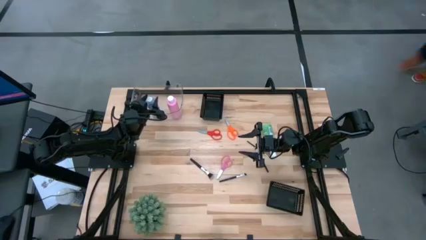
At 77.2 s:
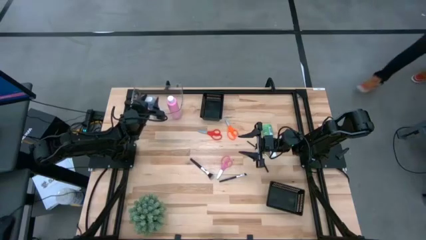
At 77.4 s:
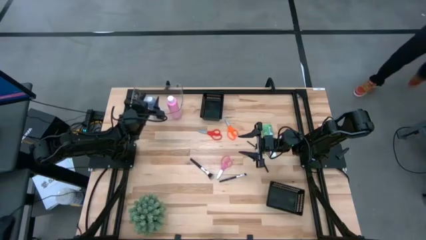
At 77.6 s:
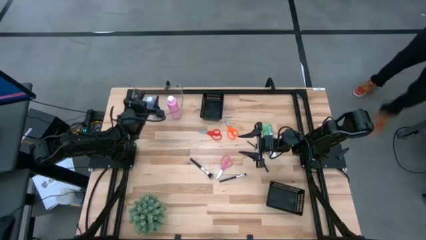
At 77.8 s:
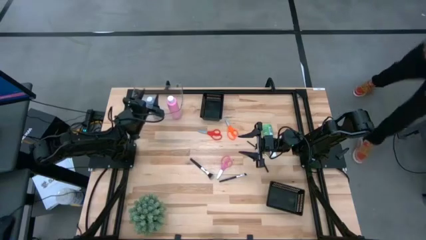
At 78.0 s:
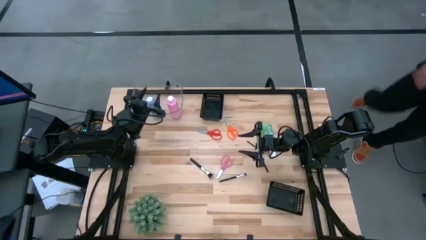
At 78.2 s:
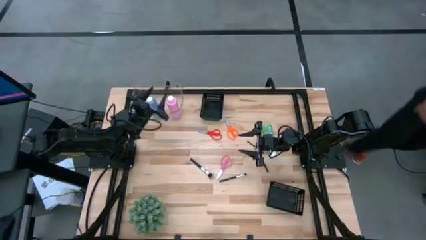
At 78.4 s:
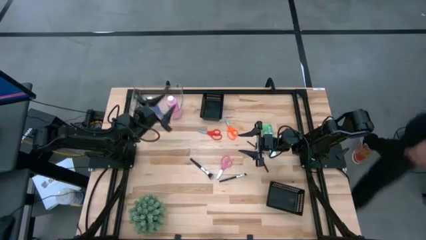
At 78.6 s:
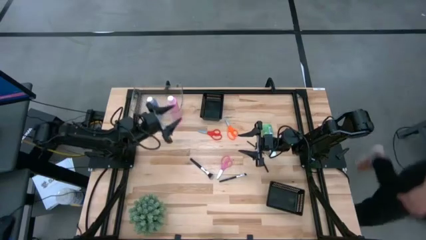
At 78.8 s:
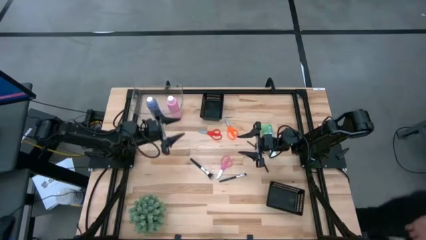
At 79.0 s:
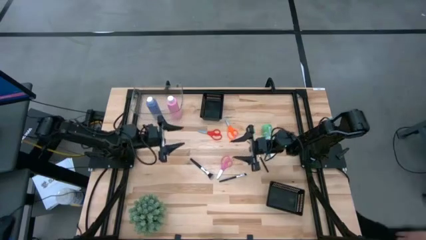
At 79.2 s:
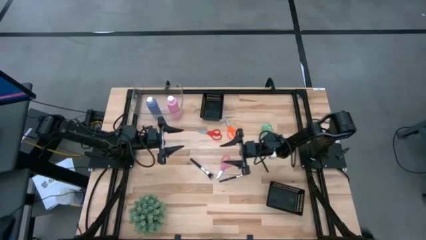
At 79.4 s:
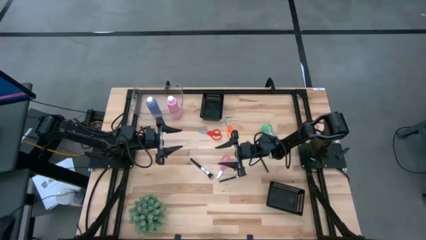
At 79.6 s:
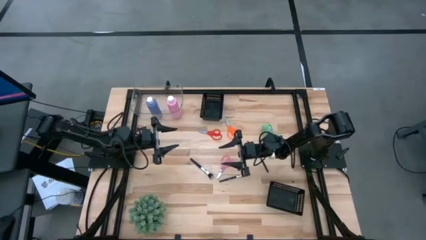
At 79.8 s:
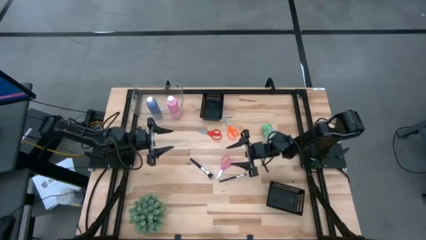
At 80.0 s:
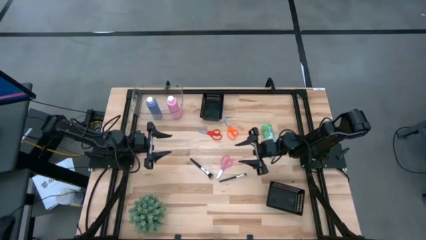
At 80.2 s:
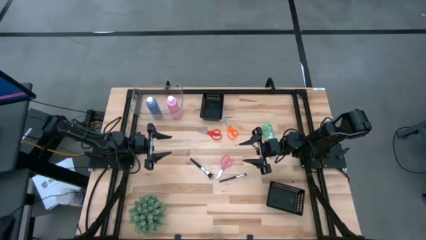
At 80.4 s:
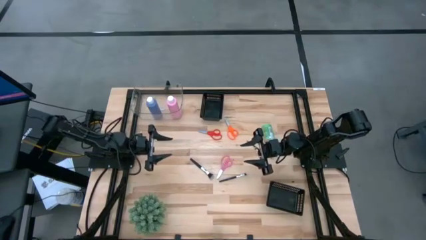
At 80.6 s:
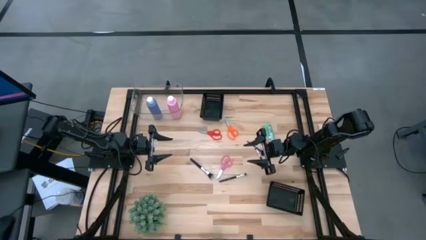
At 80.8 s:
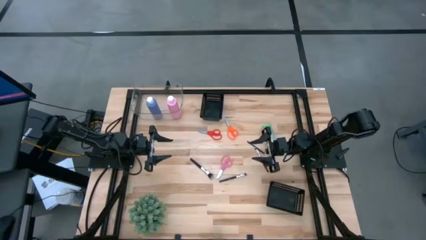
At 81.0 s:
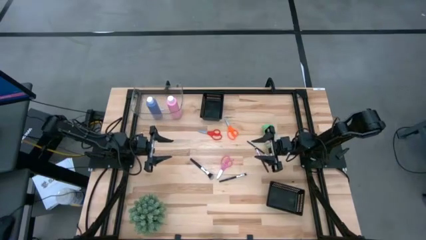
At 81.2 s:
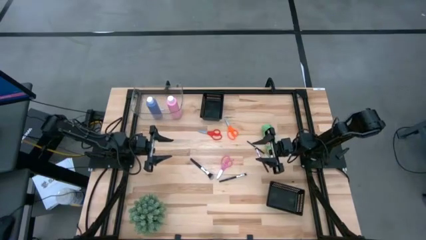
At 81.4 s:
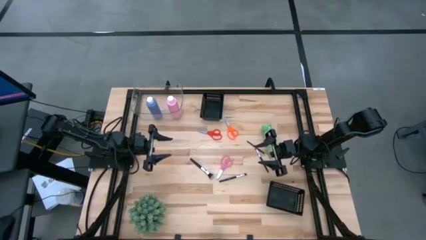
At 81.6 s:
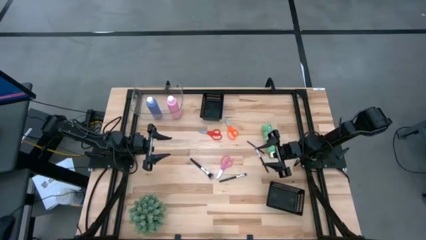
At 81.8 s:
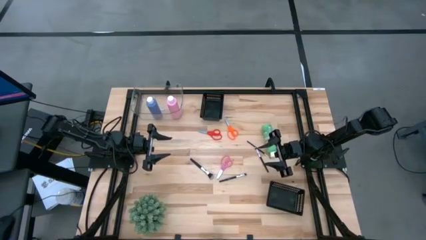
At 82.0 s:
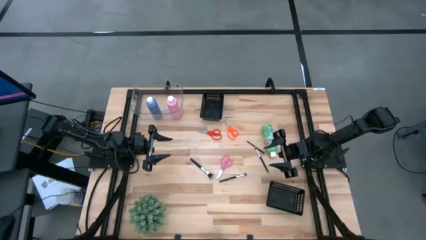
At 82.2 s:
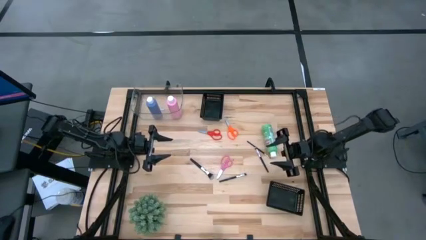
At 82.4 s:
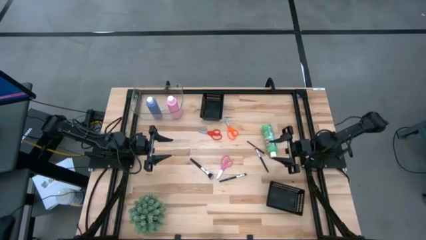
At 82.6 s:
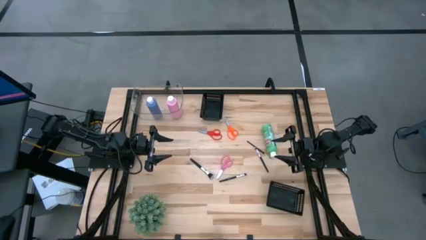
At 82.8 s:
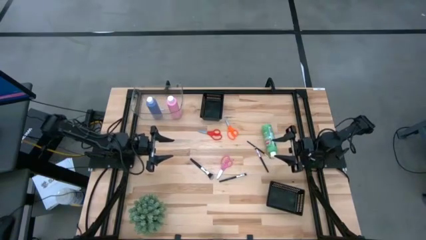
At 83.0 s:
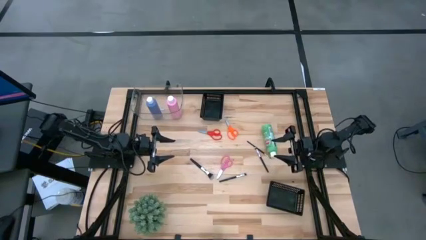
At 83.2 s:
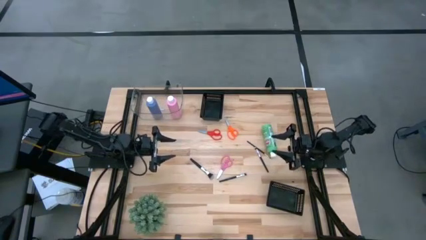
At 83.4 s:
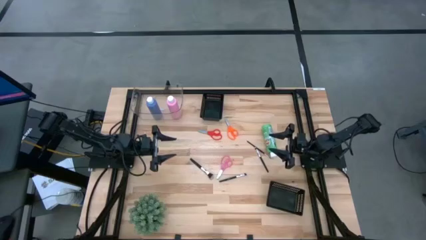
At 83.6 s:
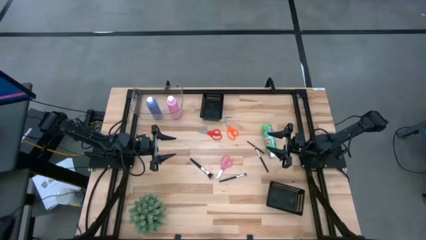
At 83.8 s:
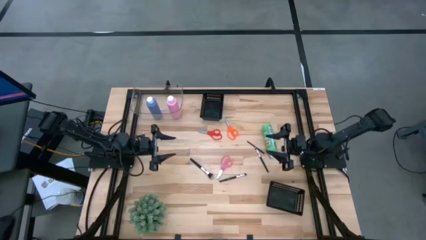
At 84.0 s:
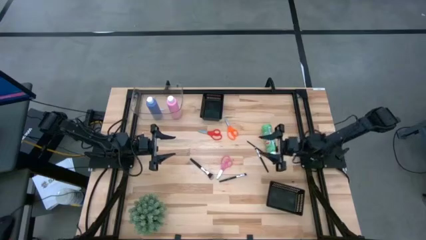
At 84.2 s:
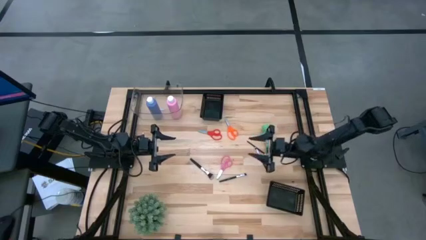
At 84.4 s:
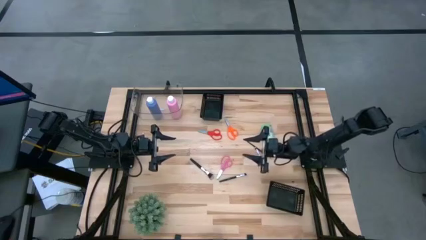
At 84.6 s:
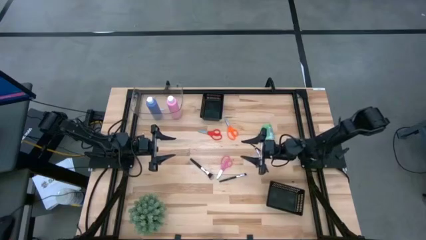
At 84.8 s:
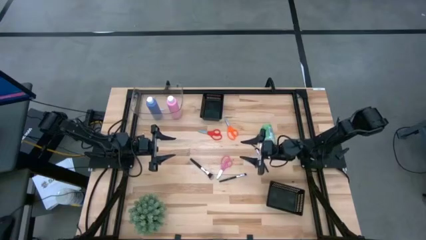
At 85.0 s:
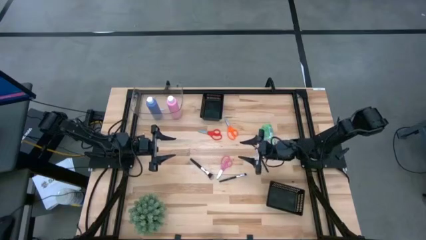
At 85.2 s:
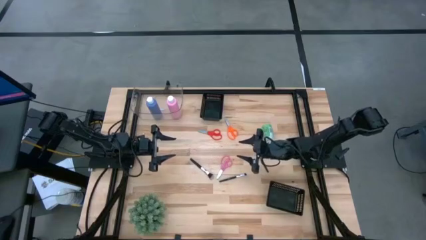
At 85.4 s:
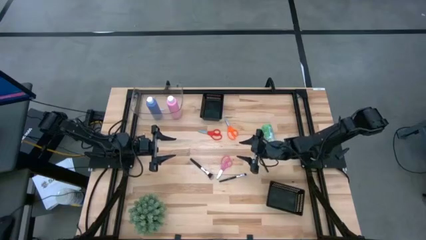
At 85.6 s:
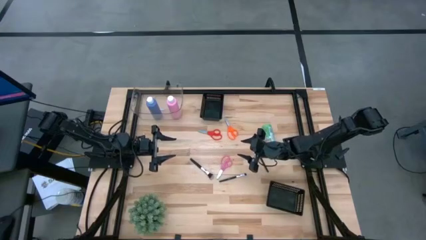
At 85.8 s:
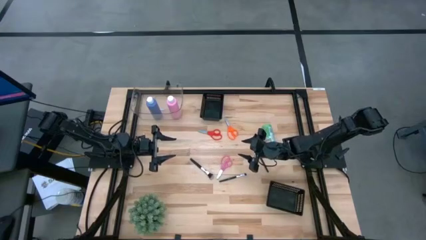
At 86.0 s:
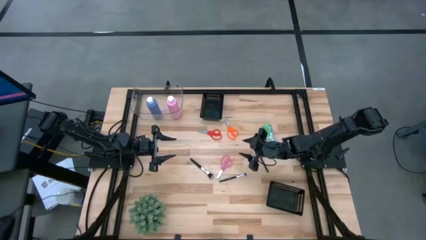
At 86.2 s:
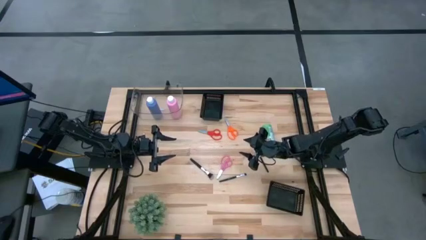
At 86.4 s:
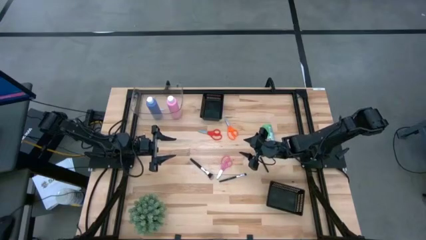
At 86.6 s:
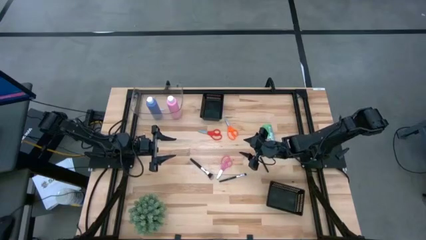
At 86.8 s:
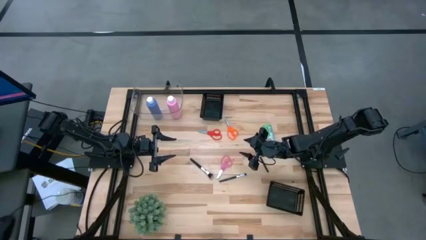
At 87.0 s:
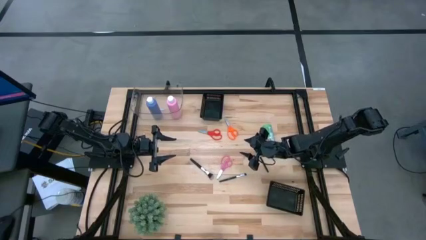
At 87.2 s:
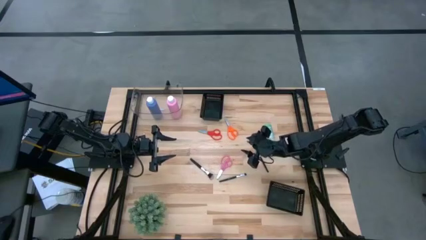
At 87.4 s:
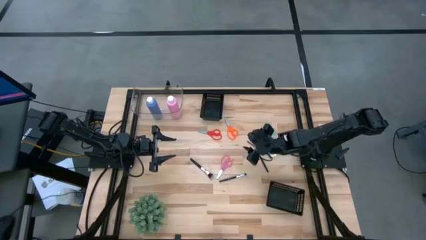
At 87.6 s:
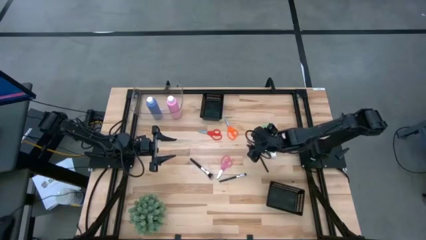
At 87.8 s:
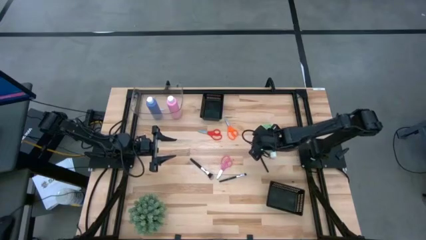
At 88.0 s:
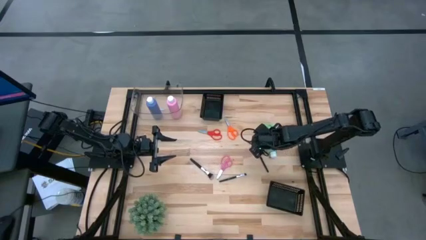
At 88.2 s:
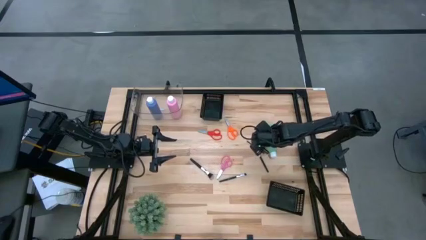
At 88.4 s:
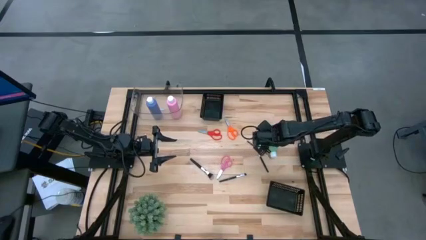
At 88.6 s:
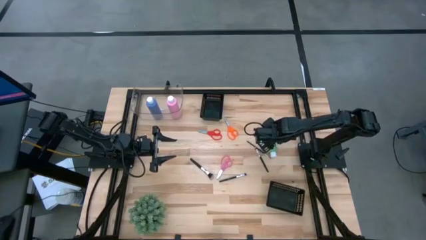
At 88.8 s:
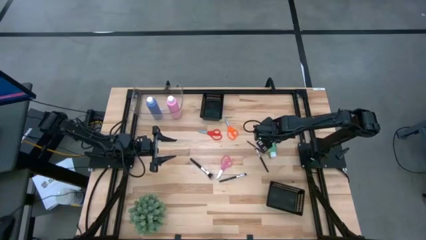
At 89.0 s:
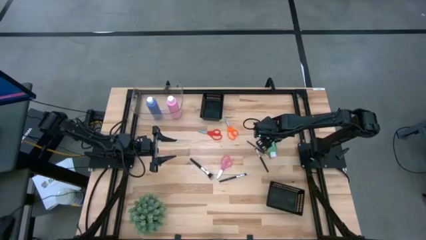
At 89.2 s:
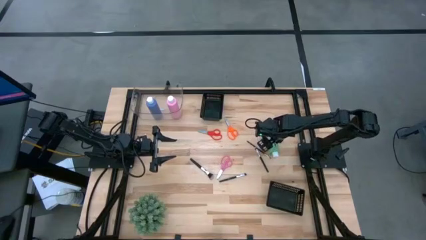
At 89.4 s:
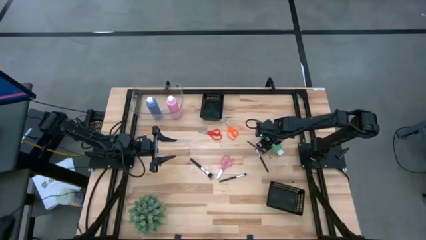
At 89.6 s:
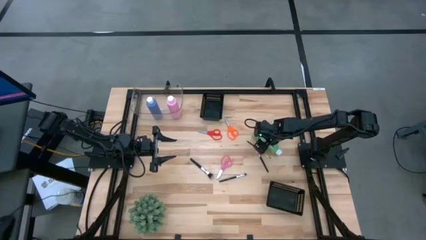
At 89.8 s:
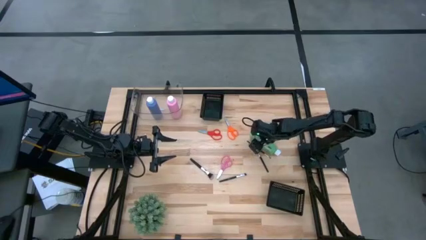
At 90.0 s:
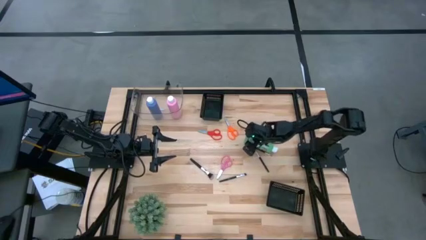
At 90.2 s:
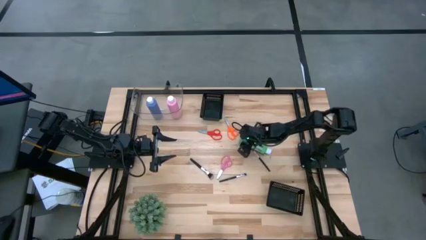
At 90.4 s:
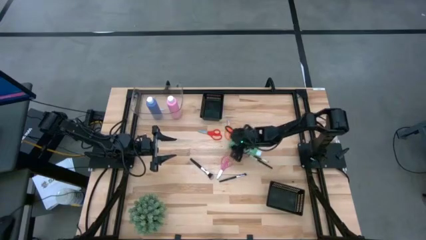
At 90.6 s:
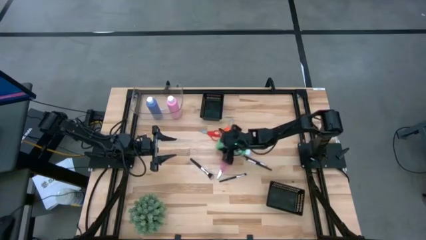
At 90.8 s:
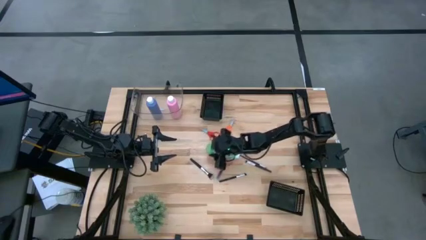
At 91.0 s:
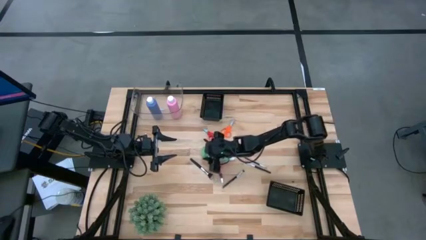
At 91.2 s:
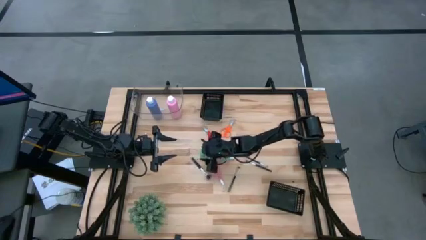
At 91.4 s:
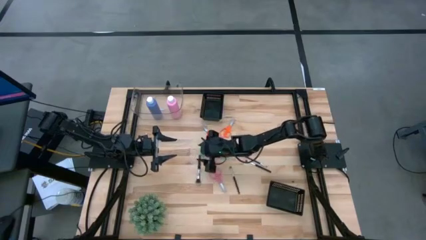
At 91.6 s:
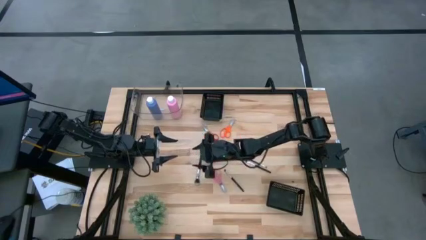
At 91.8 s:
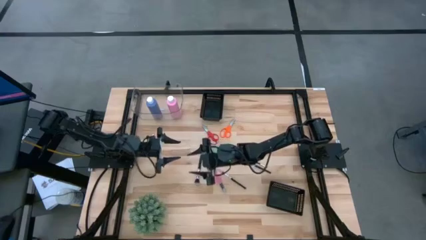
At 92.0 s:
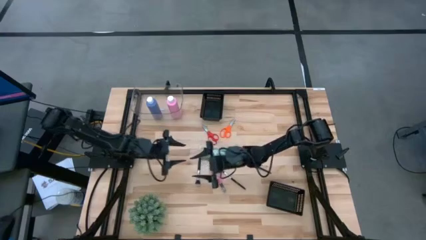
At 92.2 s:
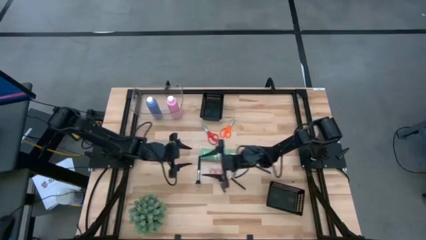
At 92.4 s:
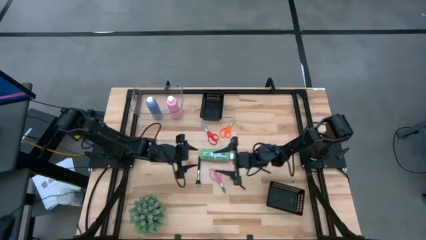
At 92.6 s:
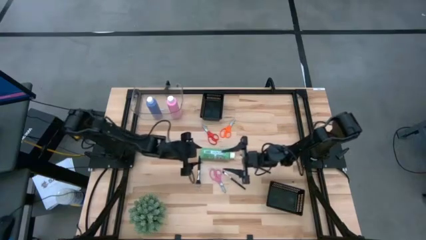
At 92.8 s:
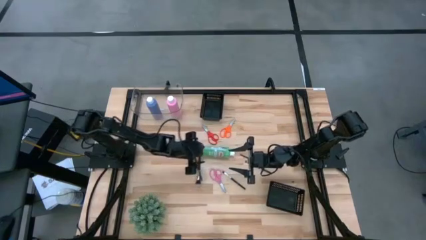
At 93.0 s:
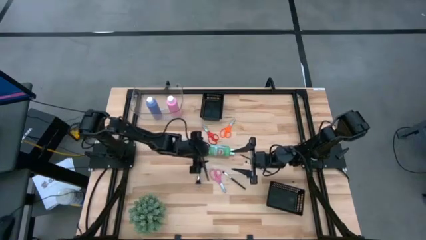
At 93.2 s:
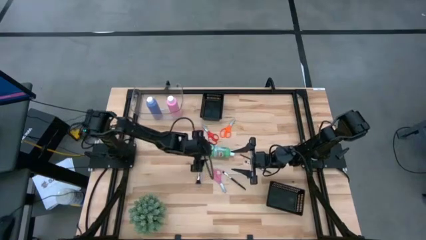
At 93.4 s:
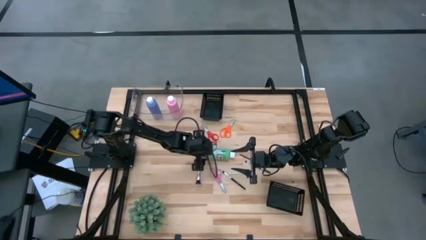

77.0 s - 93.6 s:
Task: Pick & Place Paint Supplies
Put the green paint bottle into the transparent bin
